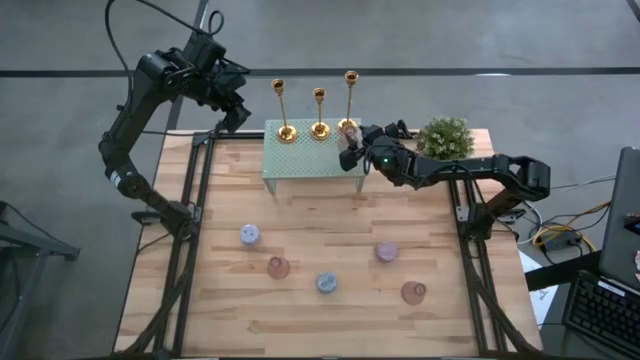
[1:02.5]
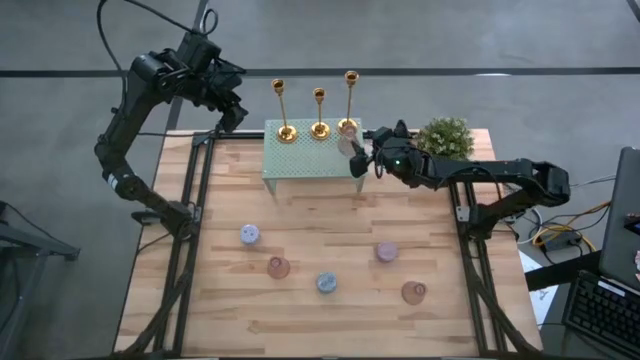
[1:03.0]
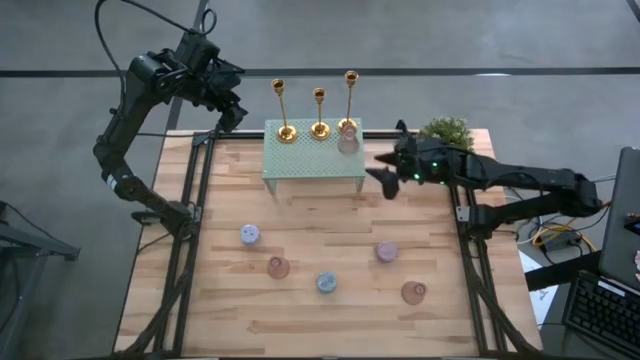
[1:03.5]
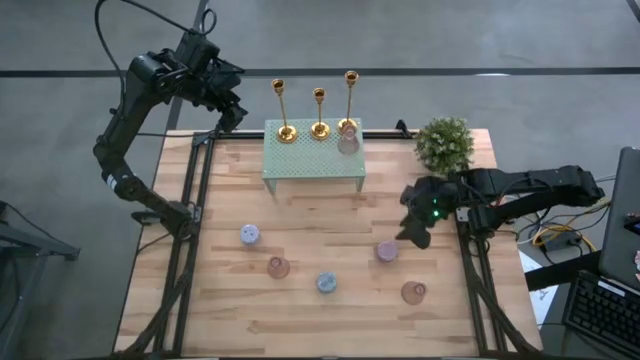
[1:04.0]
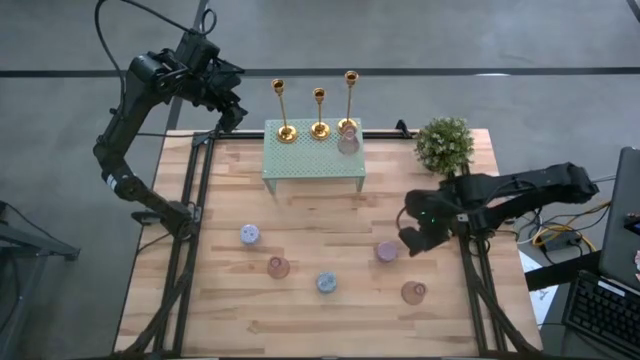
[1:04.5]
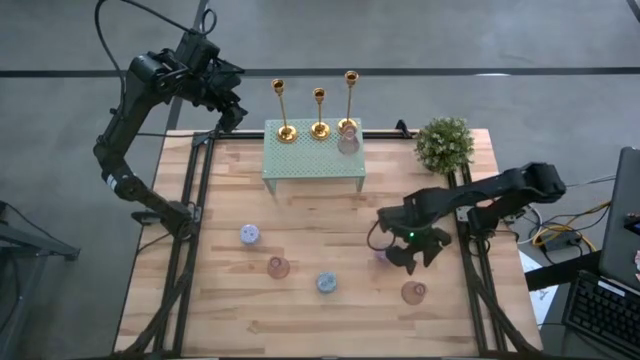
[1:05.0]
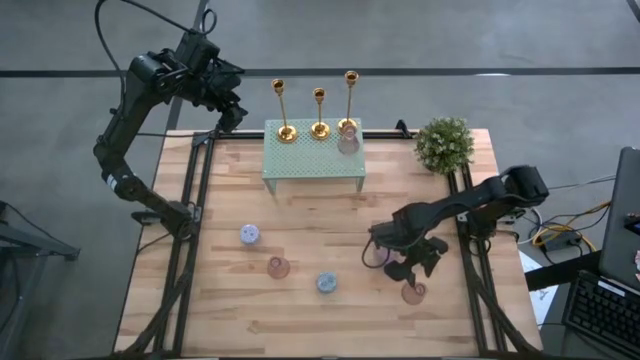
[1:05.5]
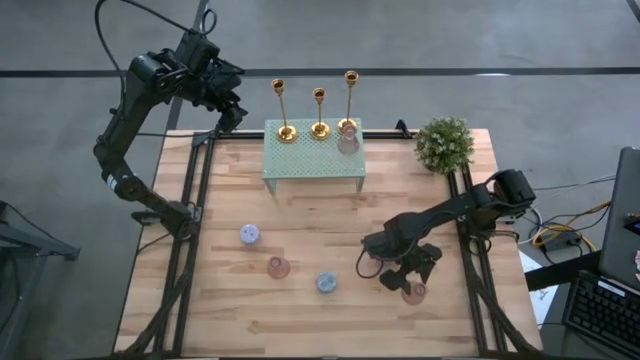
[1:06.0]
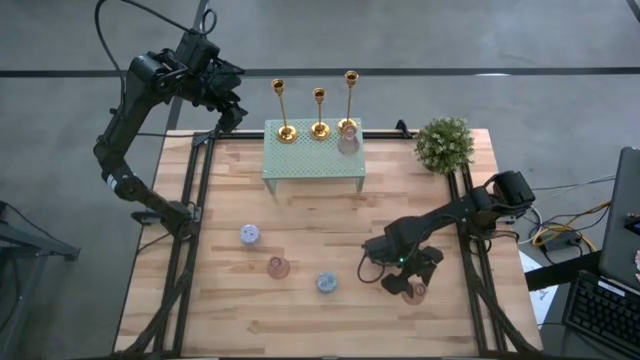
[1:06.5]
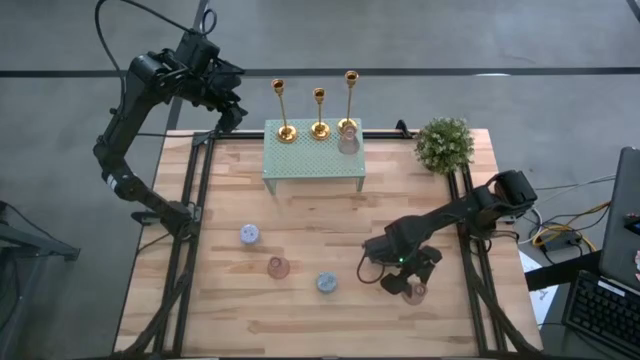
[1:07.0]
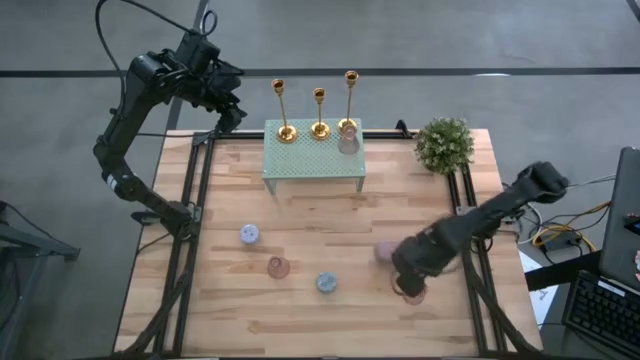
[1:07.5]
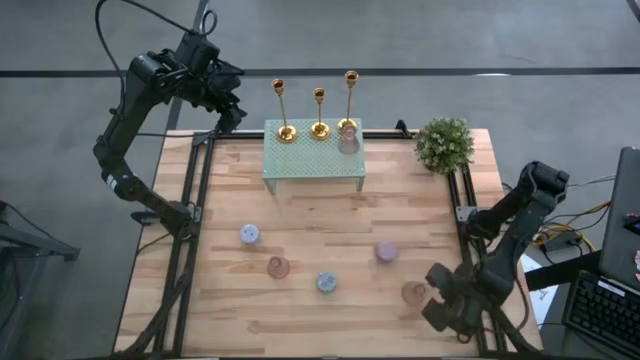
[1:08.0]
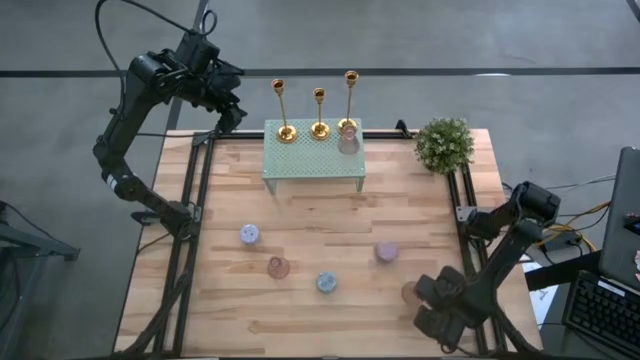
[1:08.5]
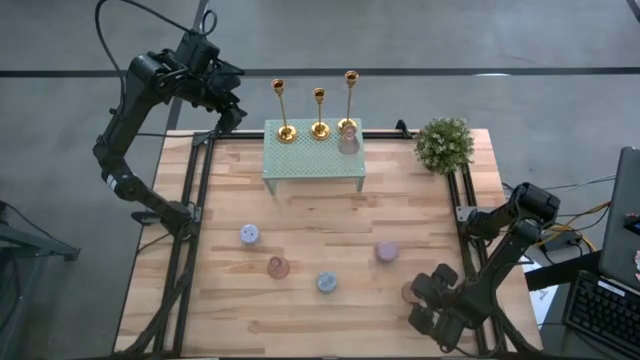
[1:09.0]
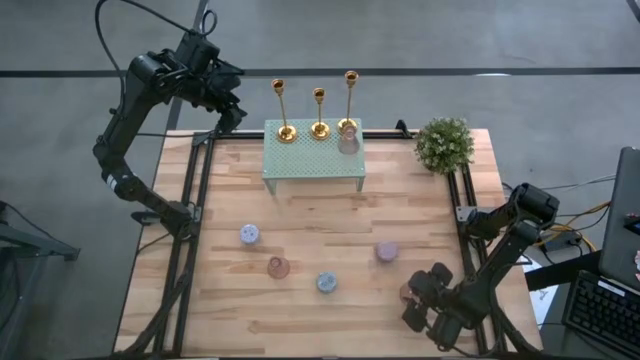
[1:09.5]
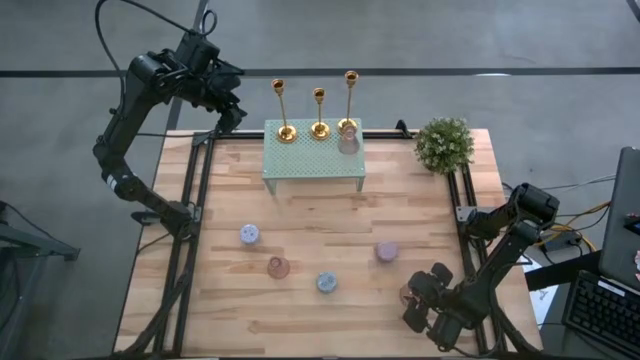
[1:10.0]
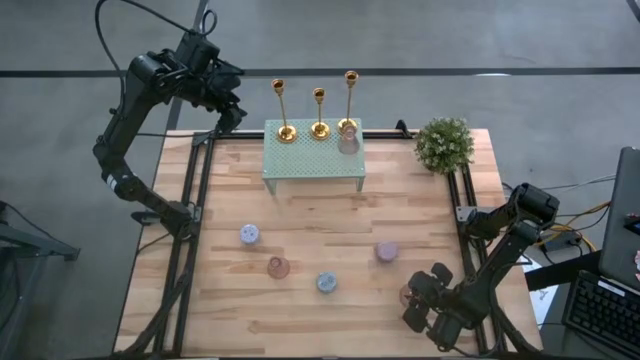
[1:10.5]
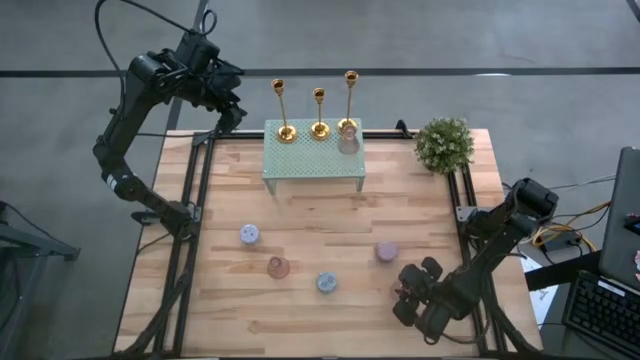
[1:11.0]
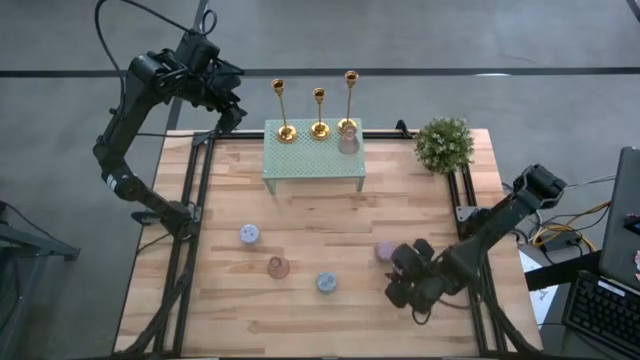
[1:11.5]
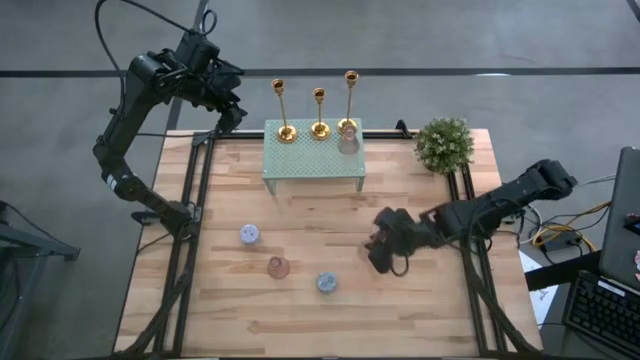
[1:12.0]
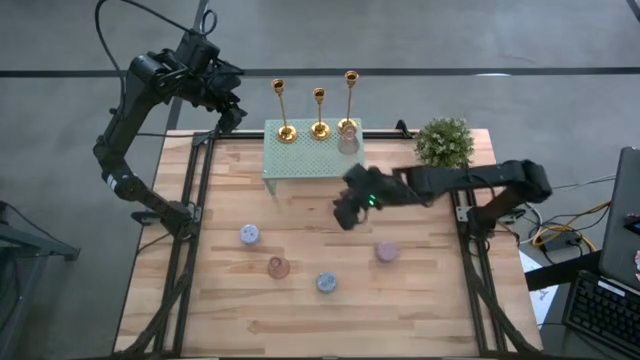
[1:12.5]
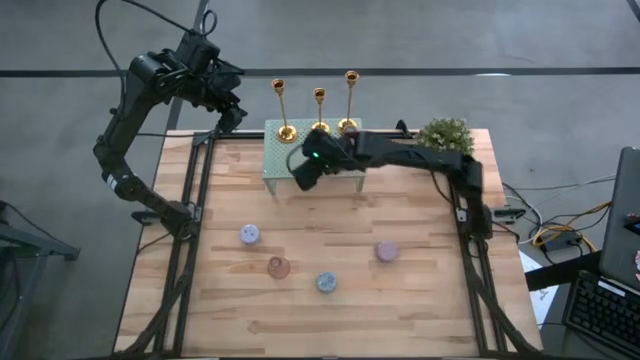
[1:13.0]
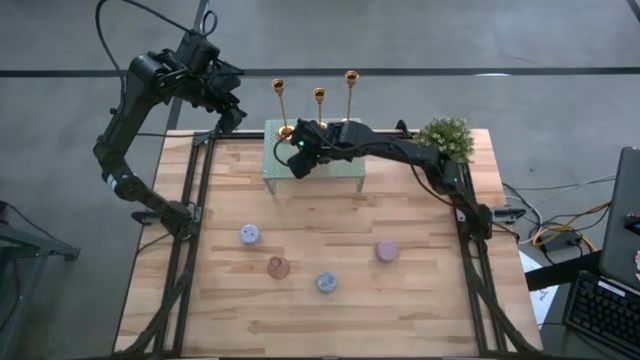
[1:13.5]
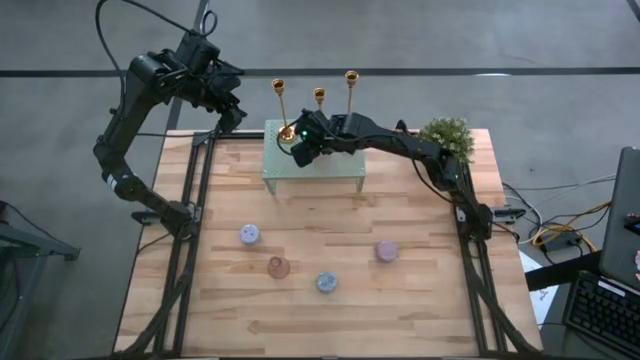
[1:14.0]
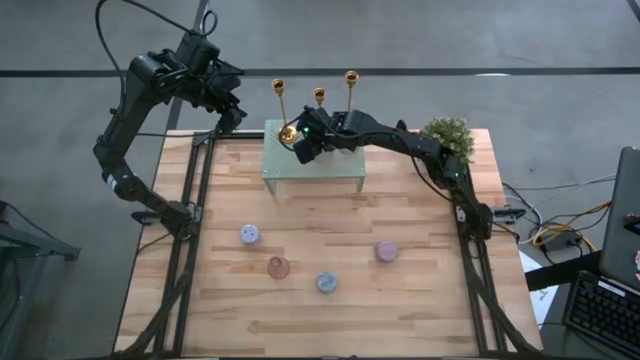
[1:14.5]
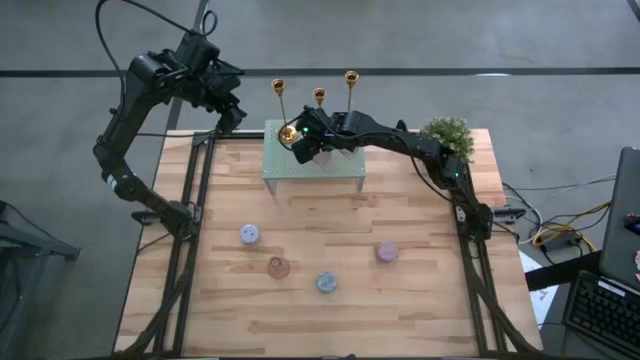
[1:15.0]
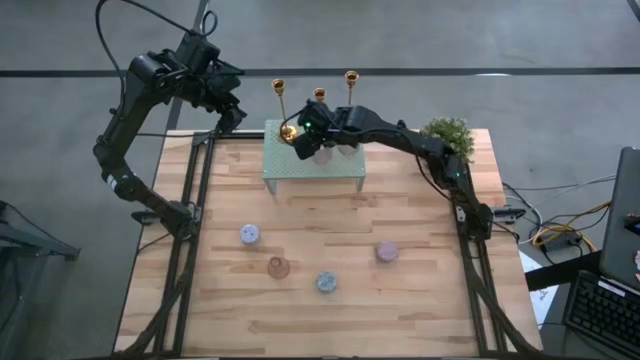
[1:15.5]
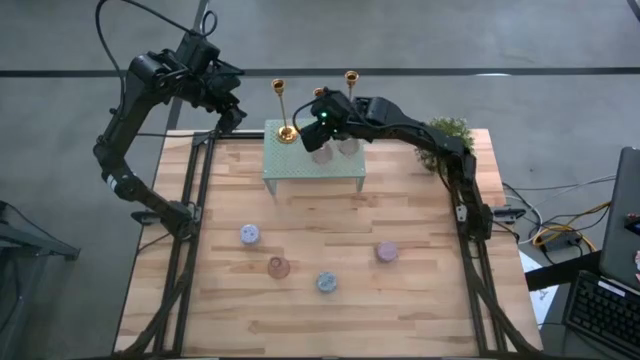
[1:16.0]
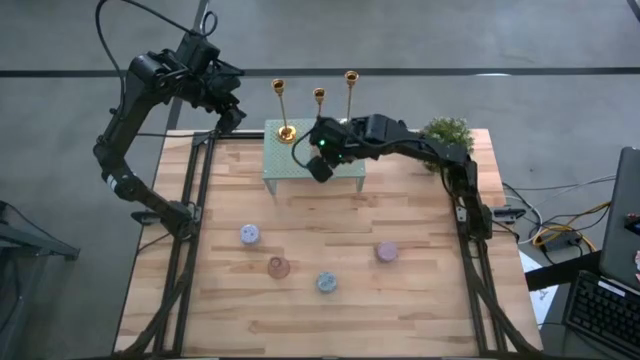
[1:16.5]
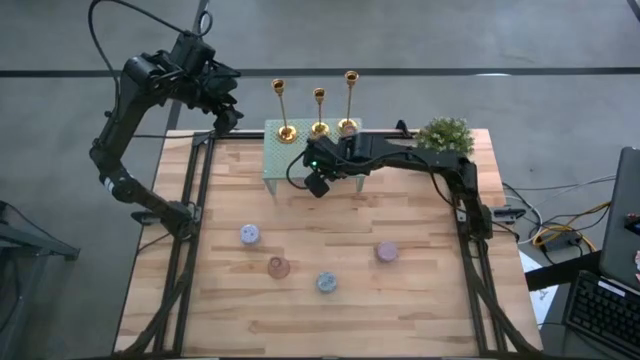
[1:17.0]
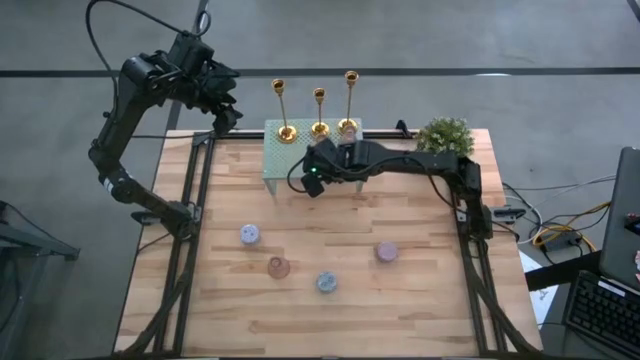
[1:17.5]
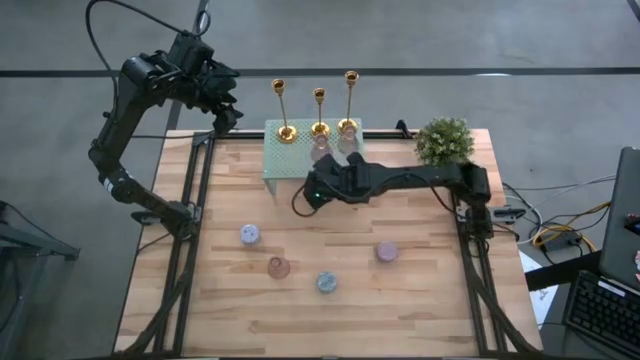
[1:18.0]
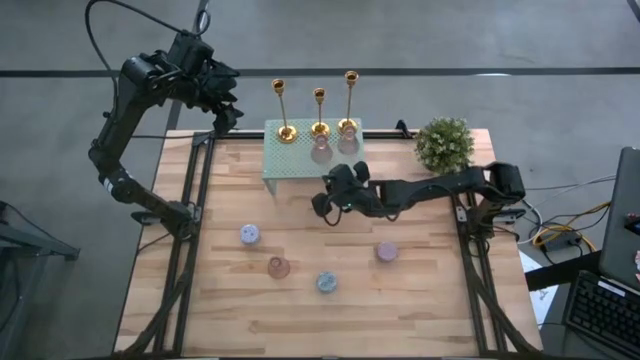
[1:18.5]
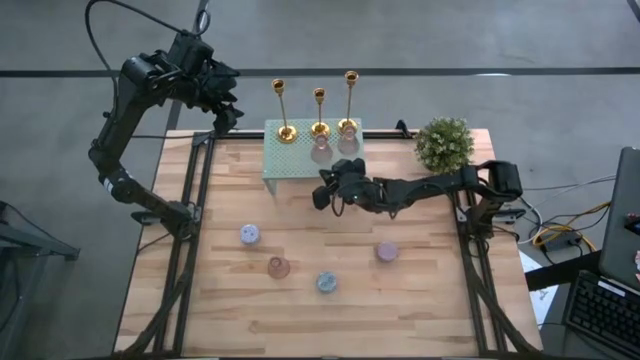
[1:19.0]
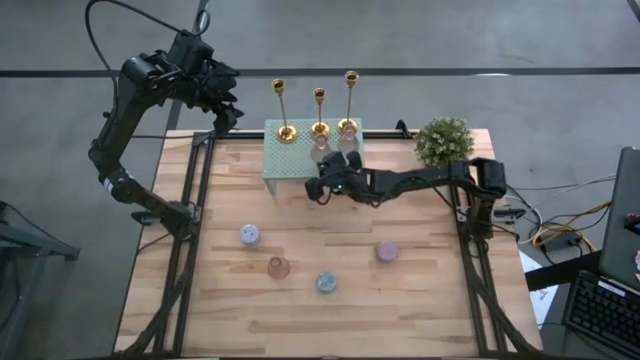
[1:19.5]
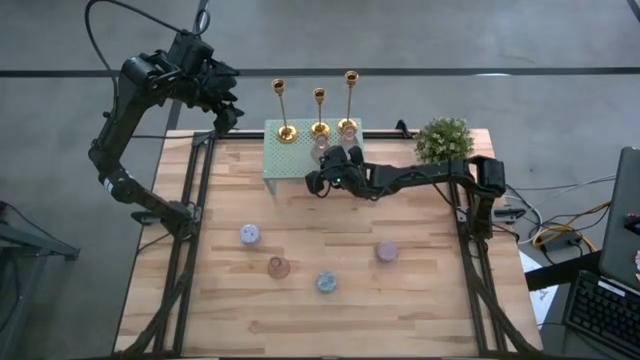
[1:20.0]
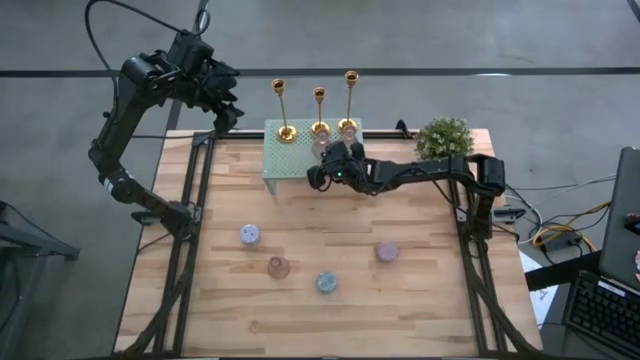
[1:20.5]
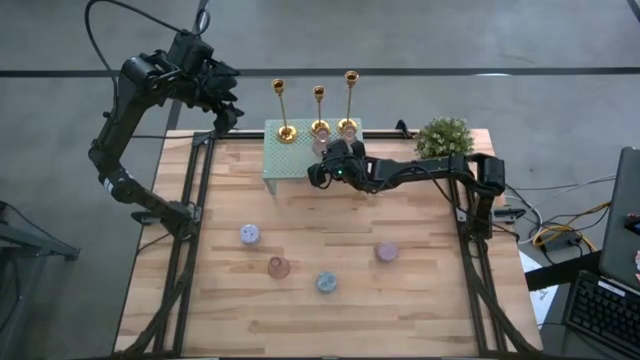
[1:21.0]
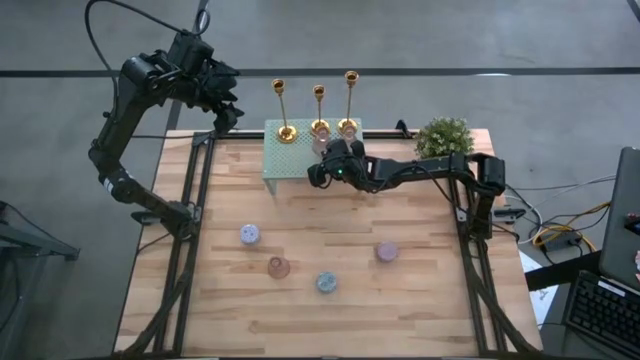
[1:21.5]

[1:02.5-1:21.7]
Task: Pick & Place candle stick holders
Put the right glass candle holder on the shelf
